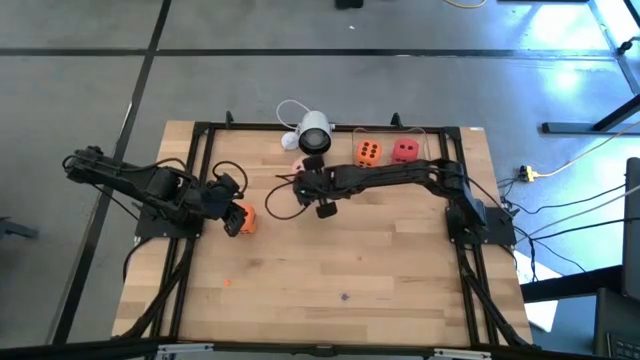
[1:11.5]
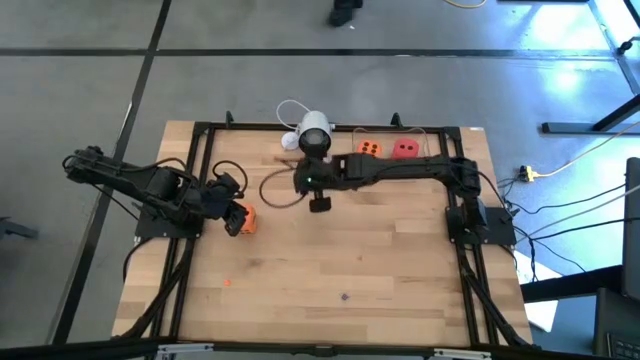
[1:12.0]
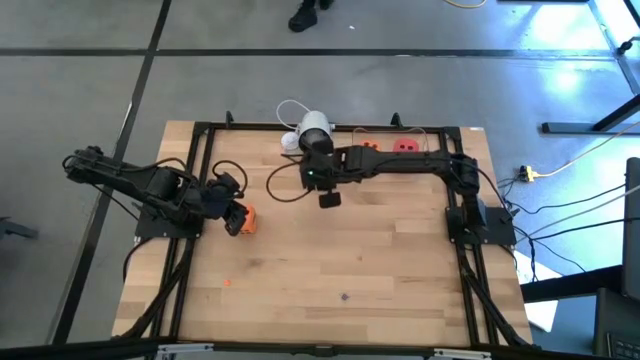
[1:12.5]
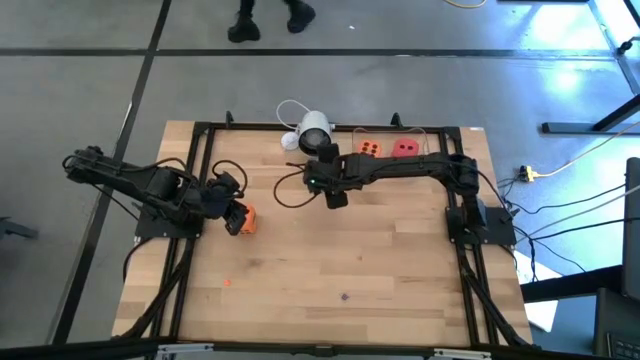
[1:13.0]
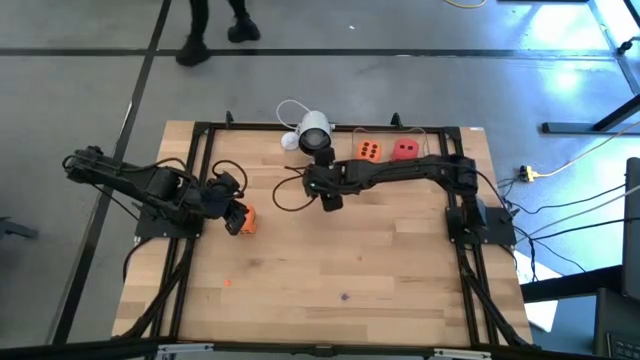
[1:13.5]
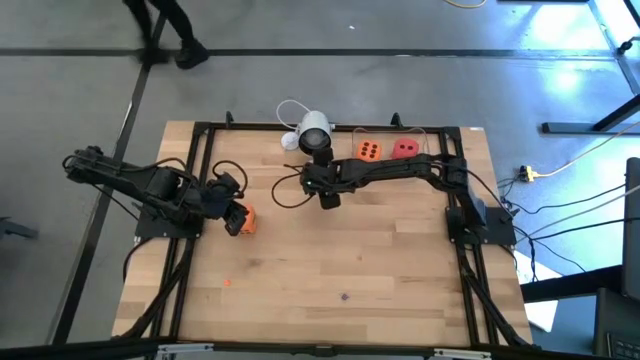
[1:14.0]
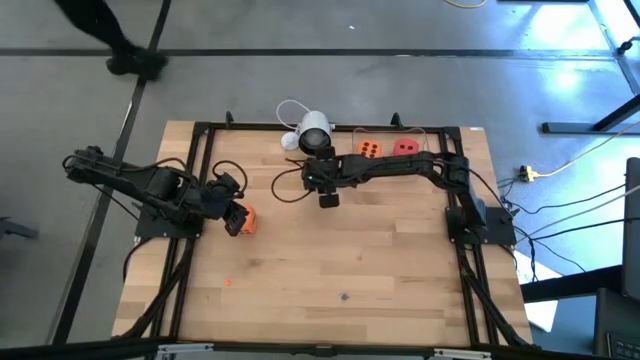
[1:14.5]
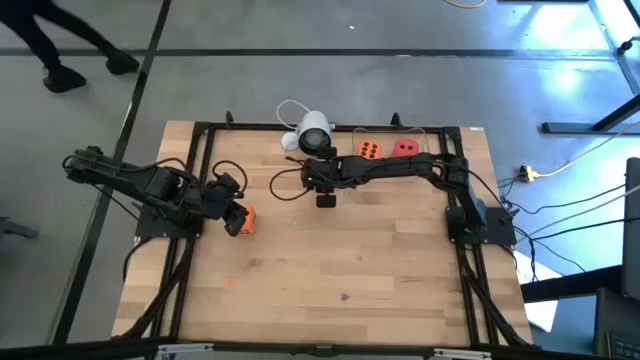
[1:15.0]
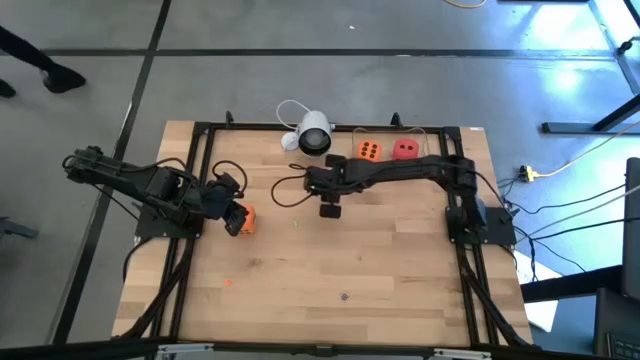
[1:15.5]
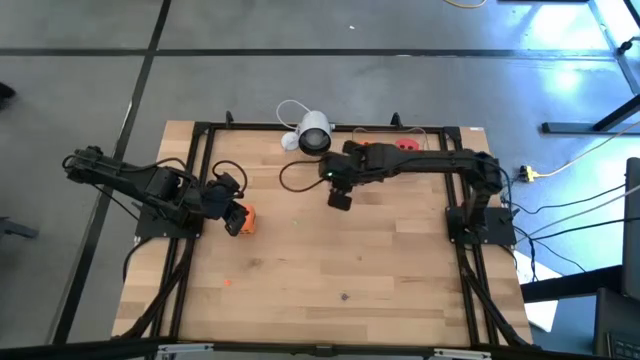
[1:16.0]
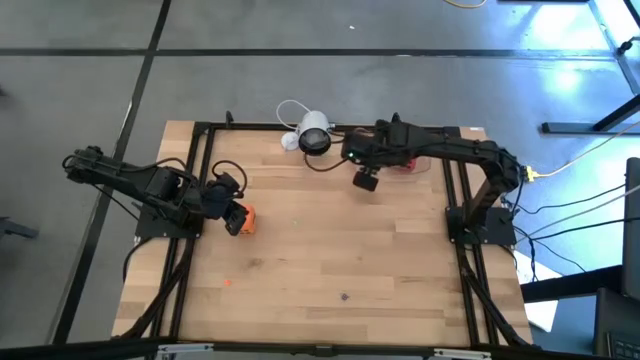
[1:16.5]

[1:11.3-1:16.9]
Task: Pick & Place Dice
Put the large pink dice into the transparent container

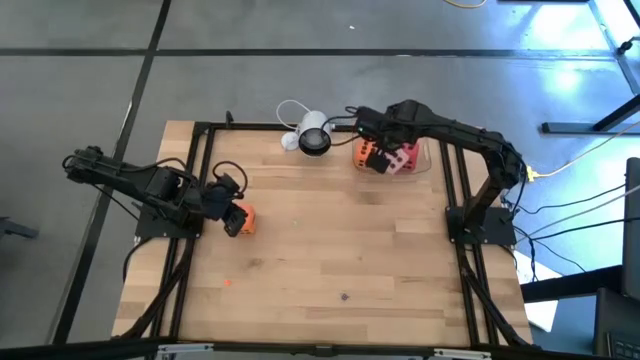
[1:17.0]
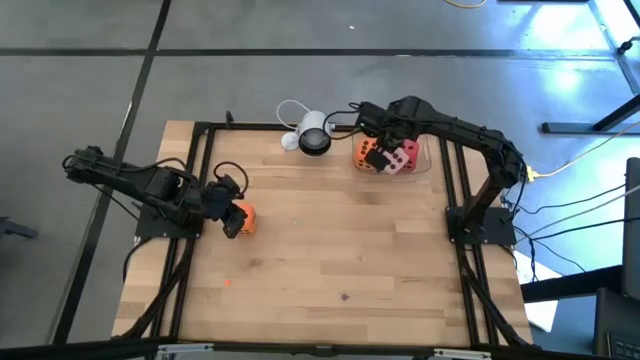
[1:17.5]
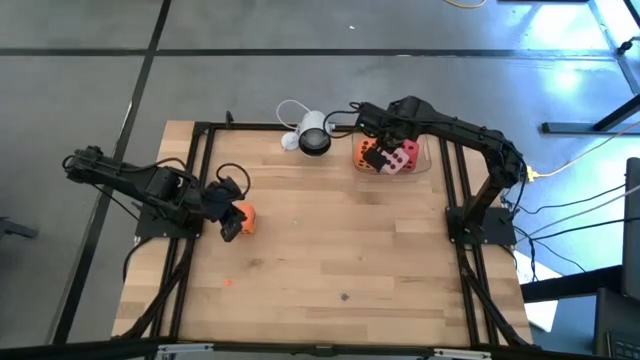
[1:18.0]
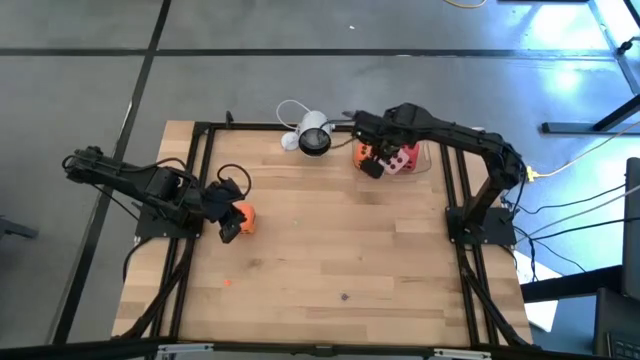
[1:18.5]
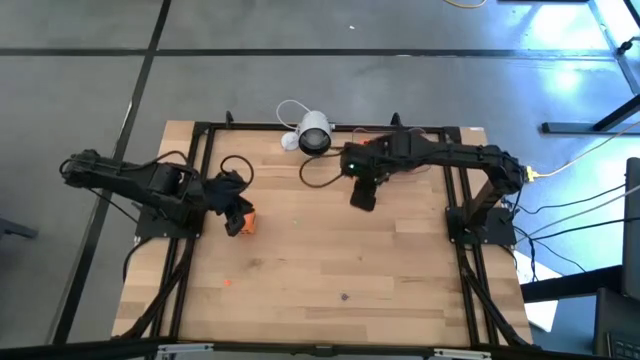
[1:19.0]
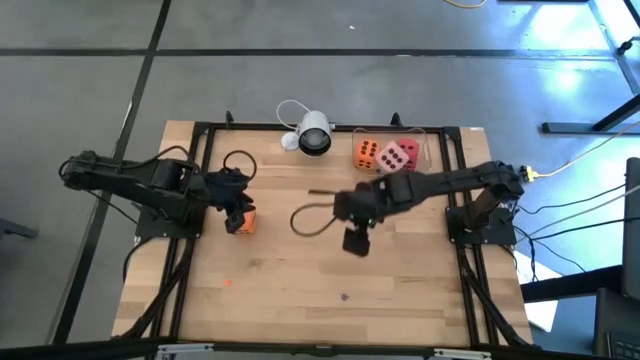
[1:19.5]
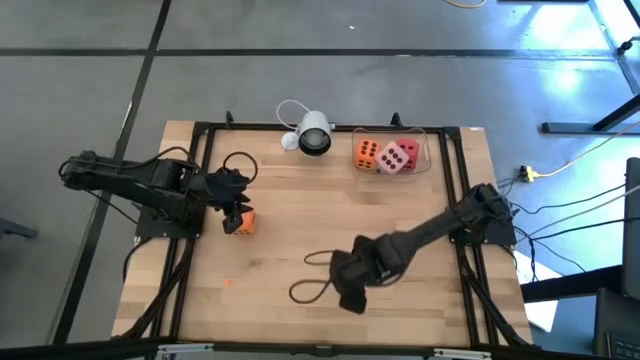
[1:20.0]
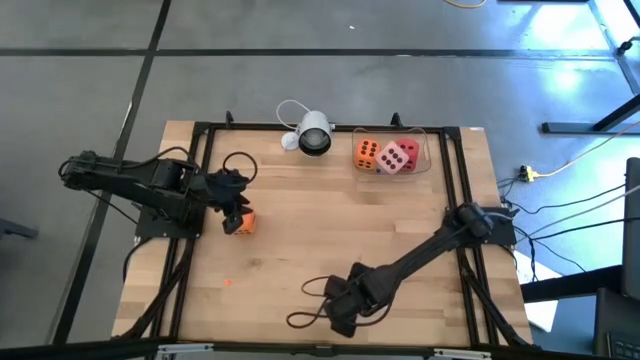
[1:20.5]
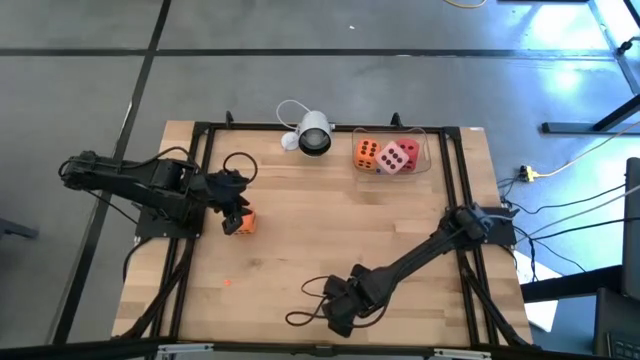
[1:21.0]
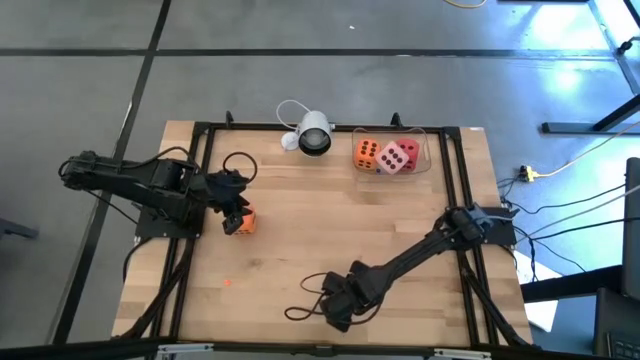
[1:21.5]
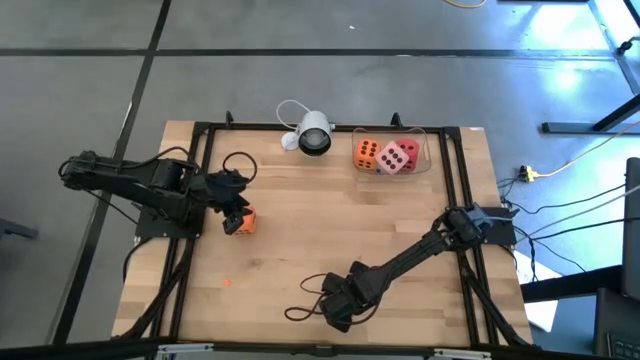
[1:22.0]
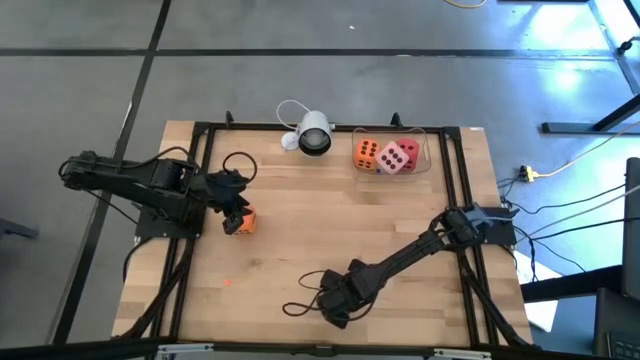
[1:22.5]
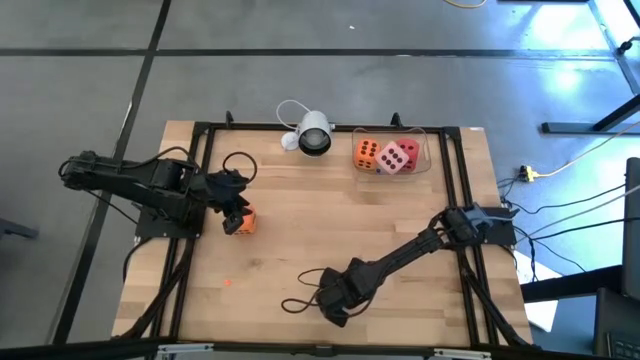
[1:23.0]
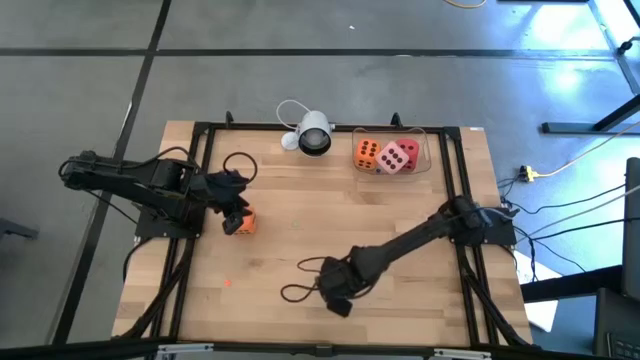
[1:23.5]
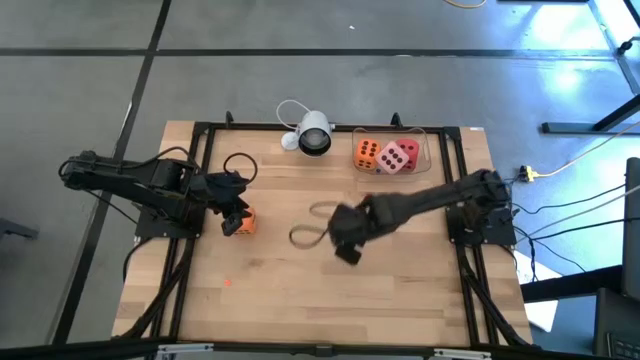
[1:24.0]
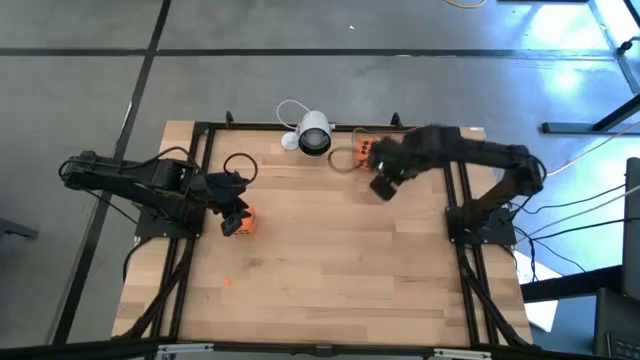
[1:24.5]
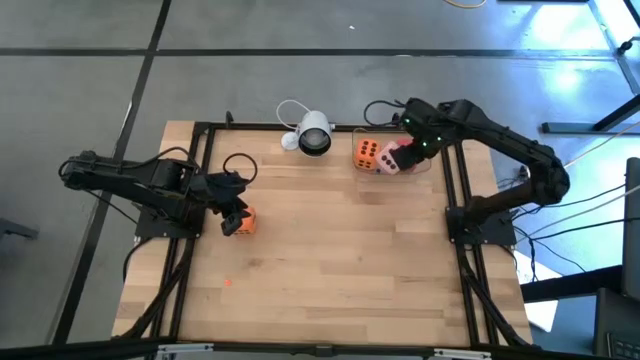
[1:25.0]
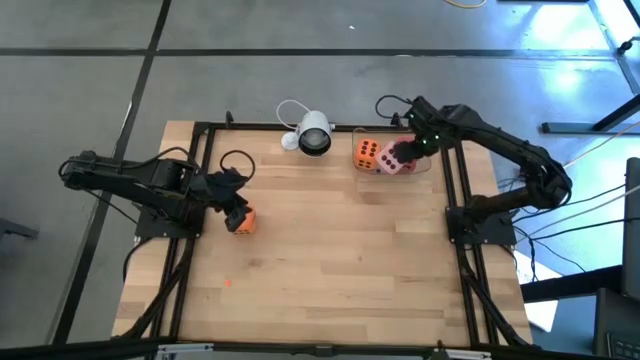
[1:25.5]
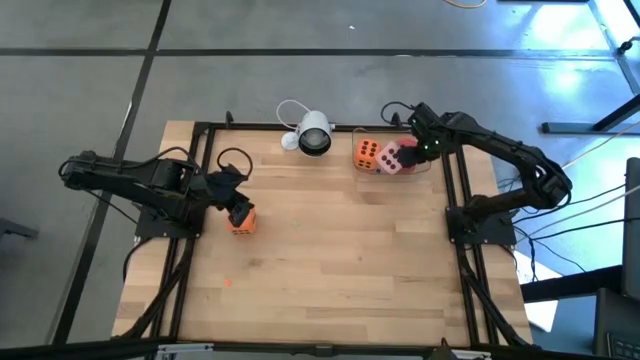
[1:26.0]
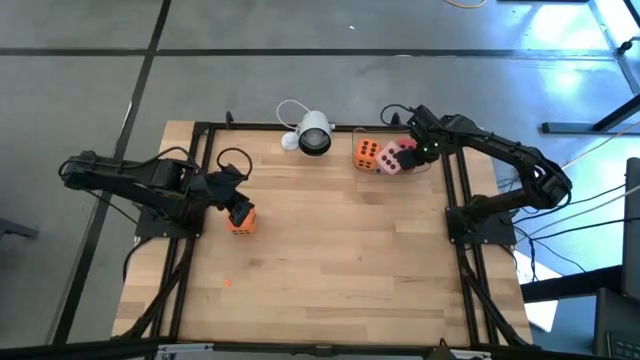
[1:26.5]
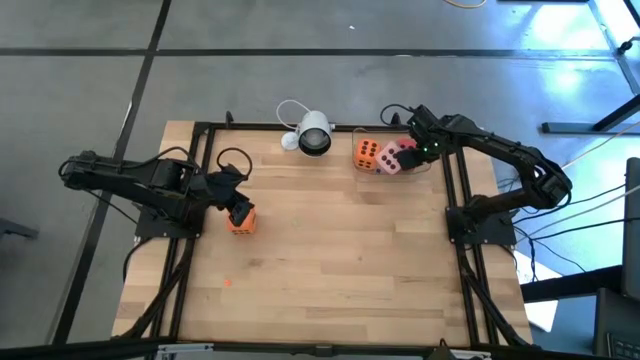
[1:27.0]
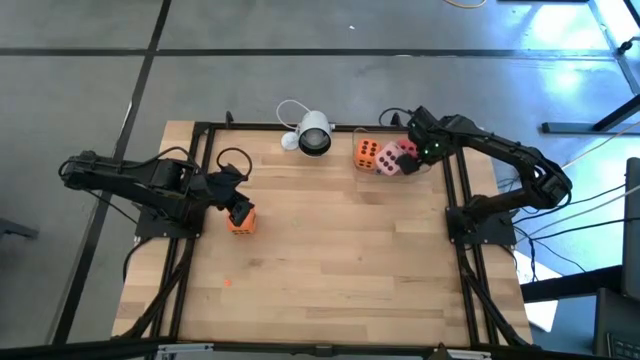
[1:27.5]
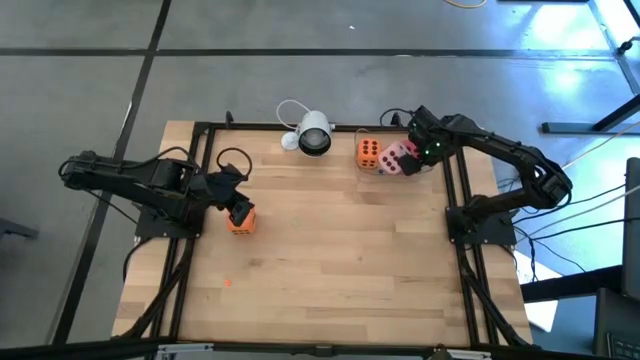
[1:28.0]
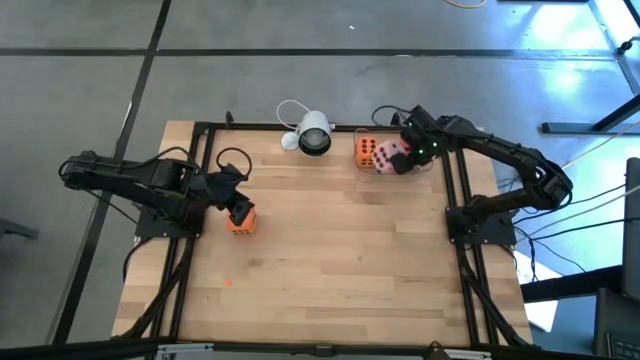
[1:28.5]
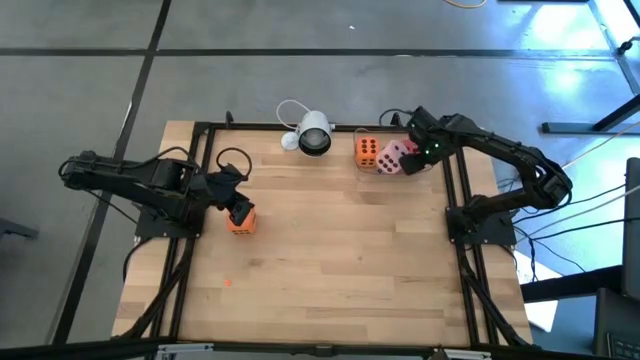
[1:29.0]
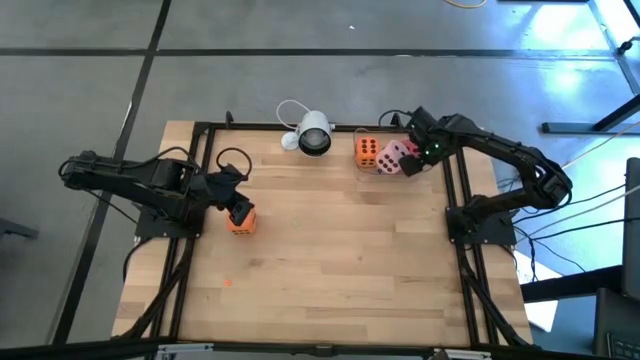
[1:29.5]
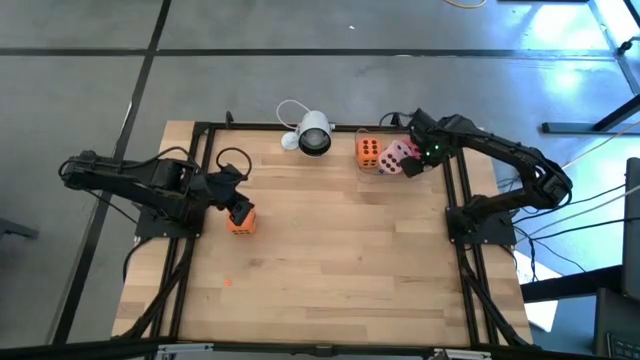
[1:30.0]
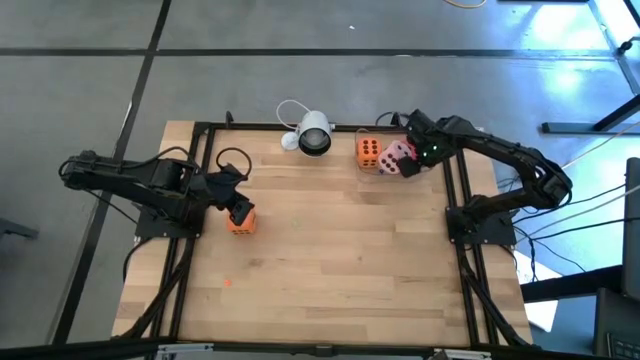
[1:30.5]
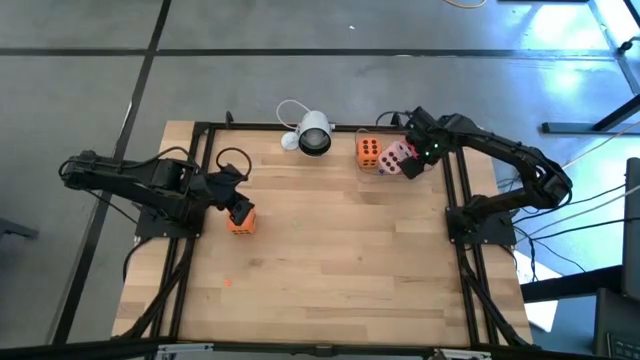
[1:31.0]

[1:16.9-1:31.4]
Put the small blue dice into the transparent container
